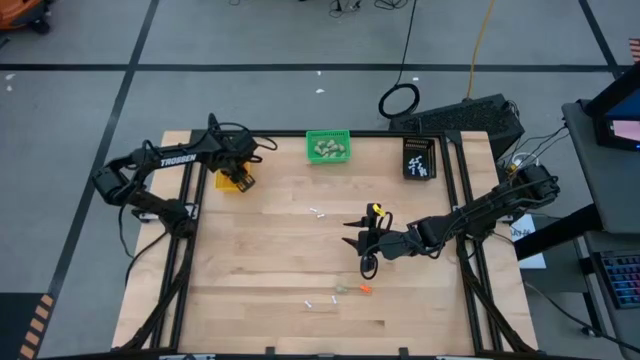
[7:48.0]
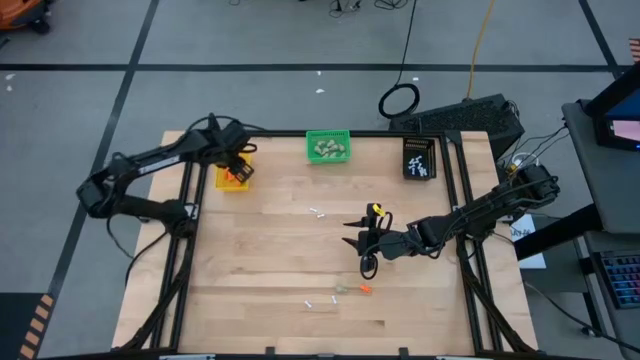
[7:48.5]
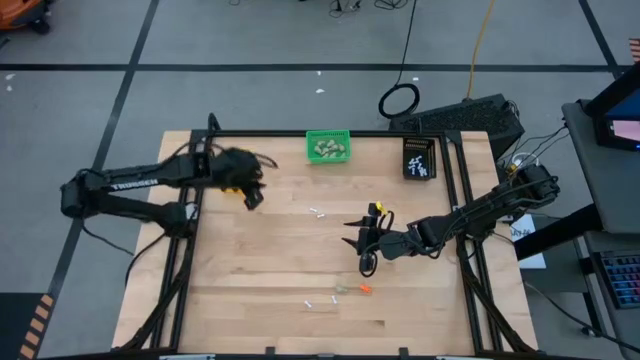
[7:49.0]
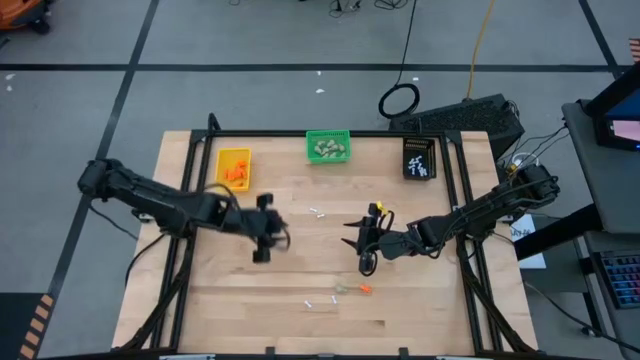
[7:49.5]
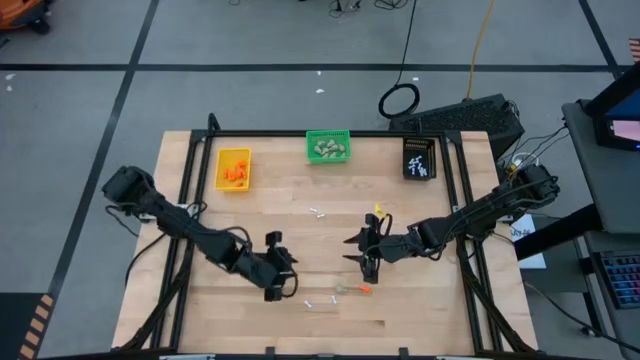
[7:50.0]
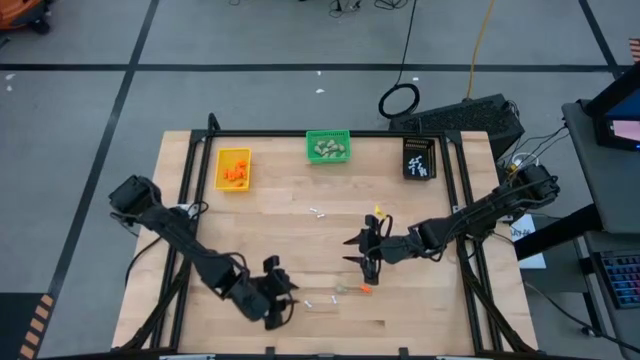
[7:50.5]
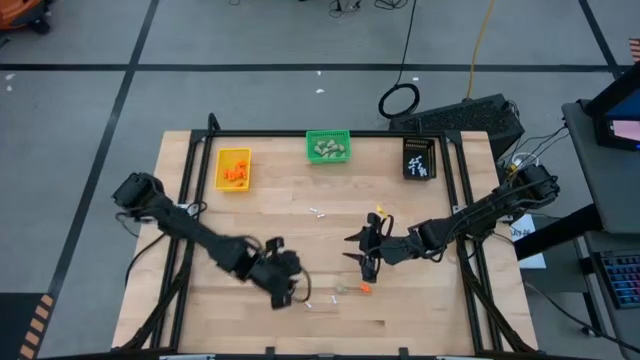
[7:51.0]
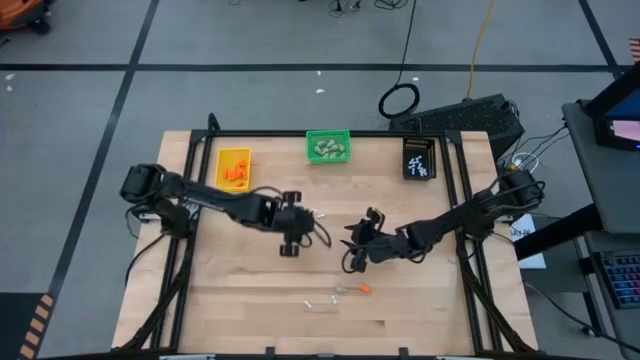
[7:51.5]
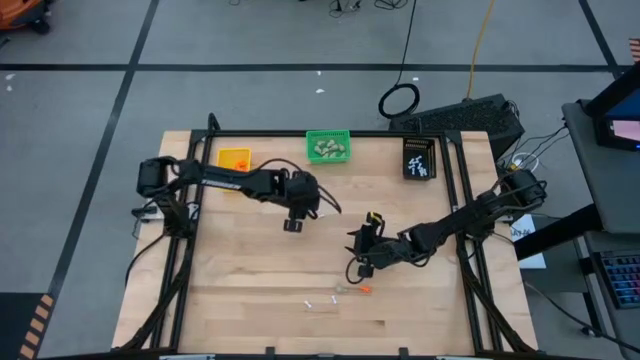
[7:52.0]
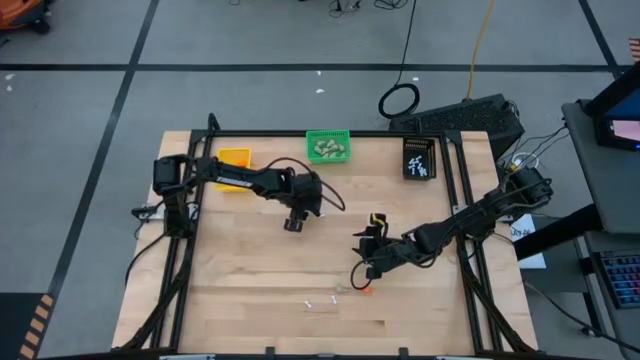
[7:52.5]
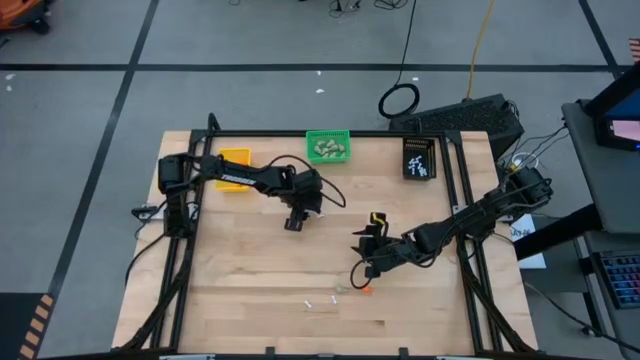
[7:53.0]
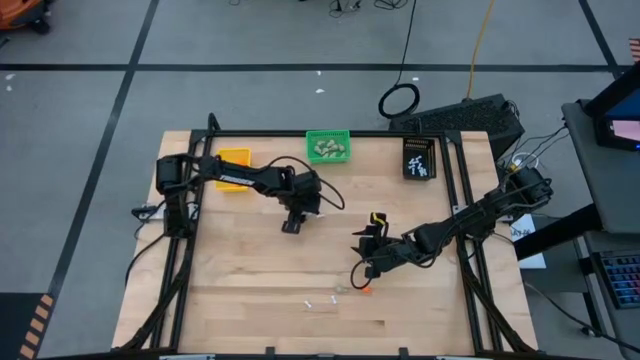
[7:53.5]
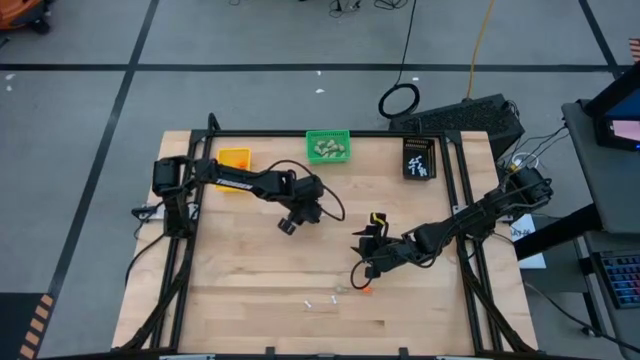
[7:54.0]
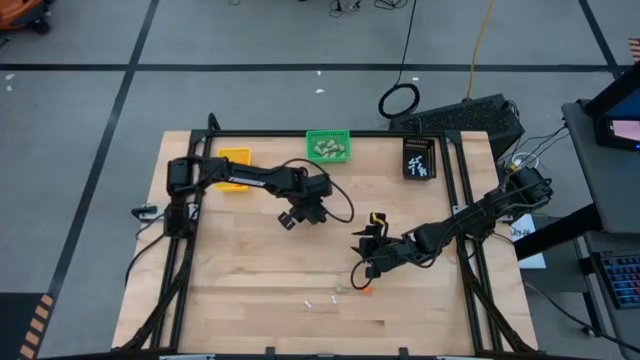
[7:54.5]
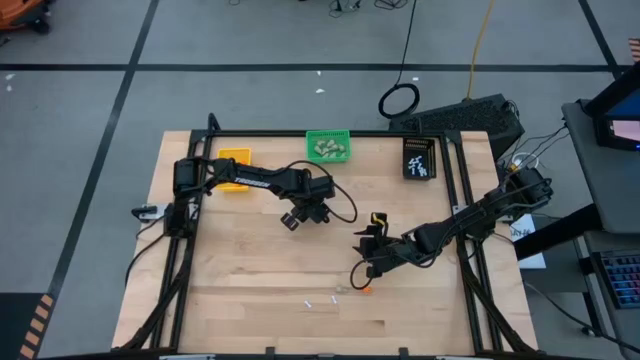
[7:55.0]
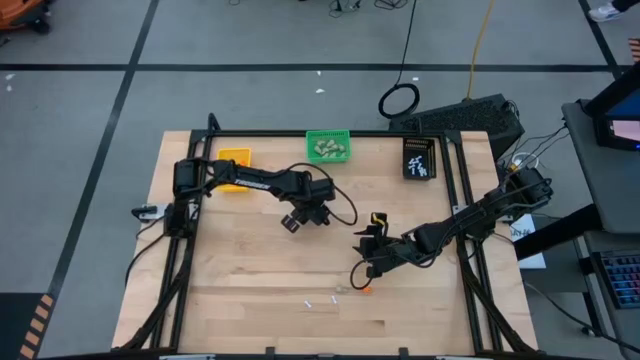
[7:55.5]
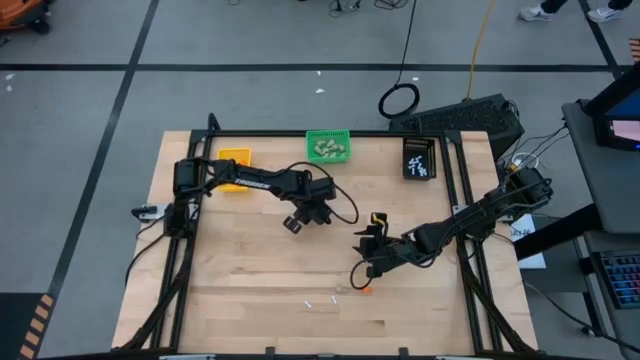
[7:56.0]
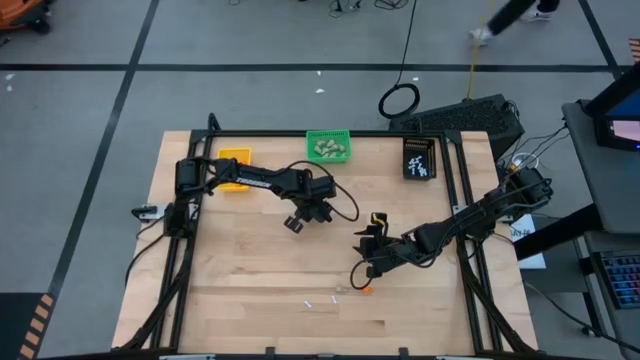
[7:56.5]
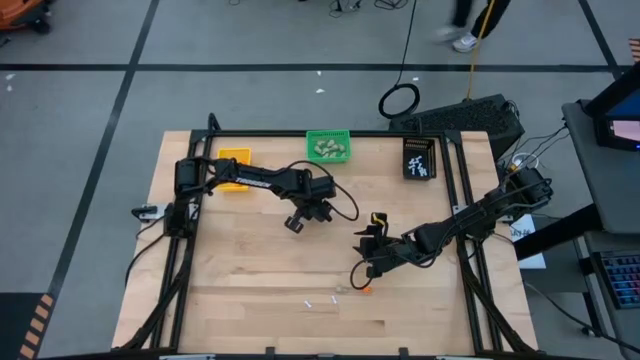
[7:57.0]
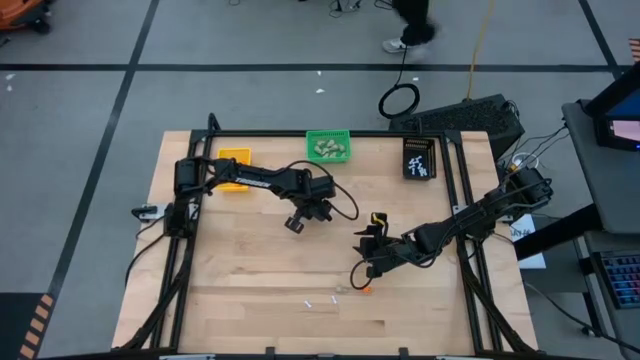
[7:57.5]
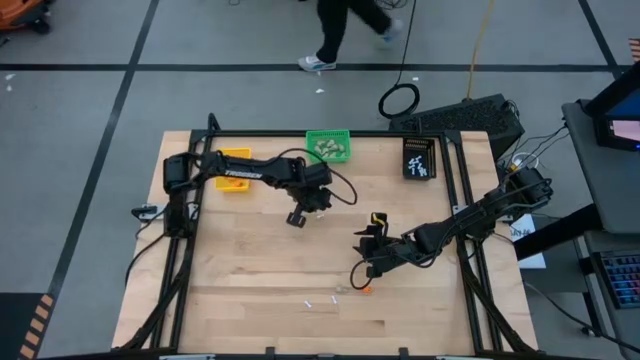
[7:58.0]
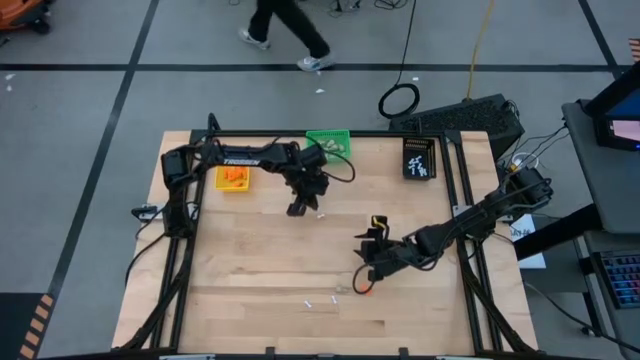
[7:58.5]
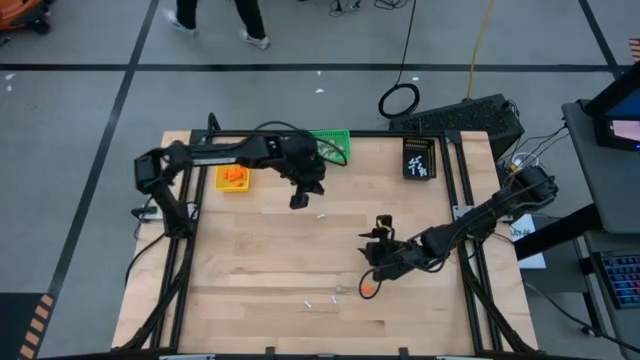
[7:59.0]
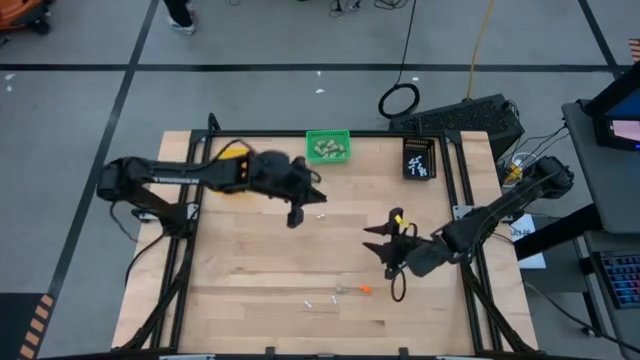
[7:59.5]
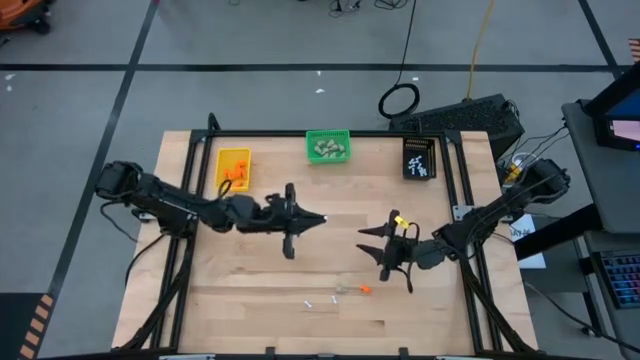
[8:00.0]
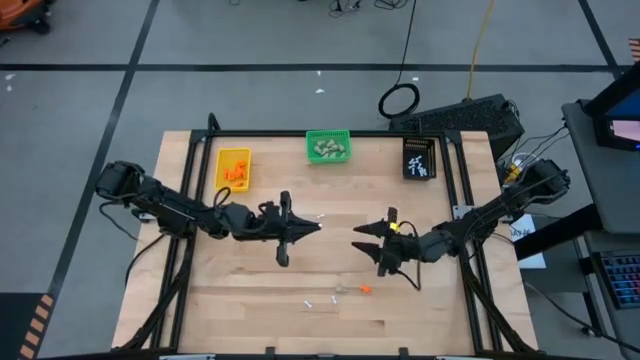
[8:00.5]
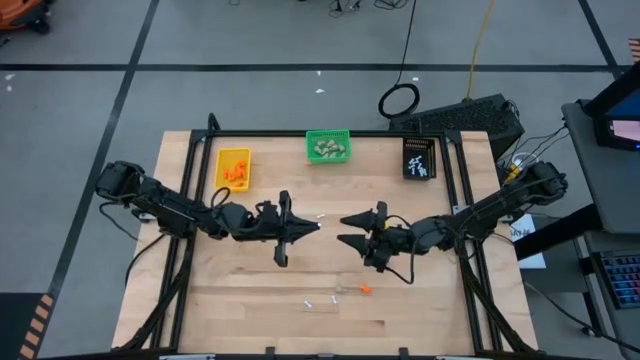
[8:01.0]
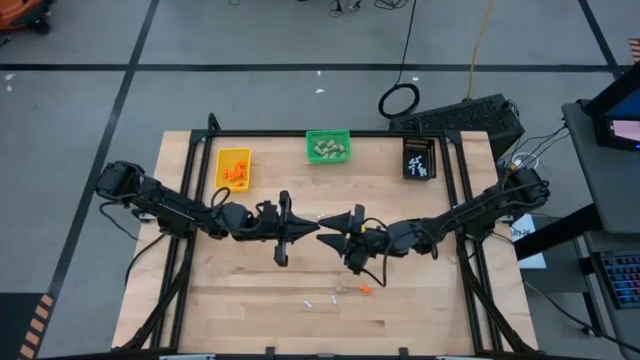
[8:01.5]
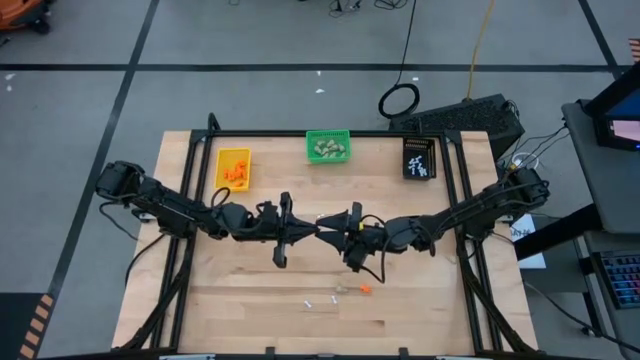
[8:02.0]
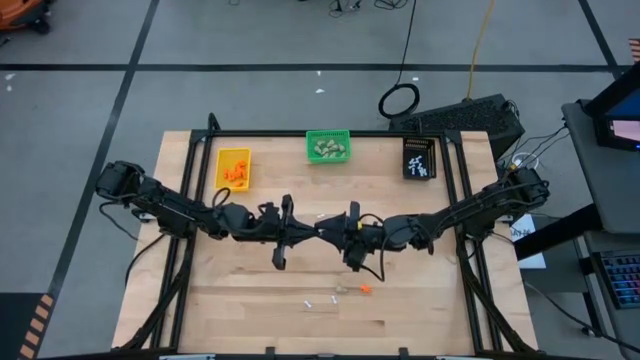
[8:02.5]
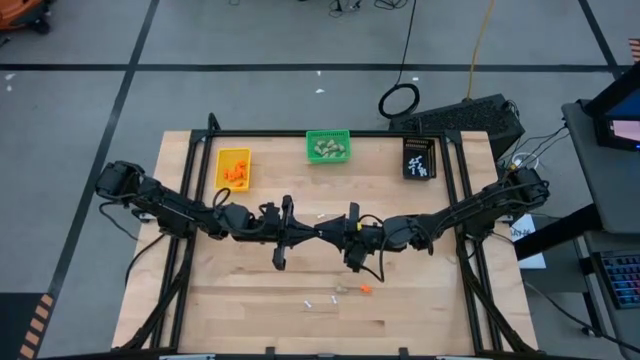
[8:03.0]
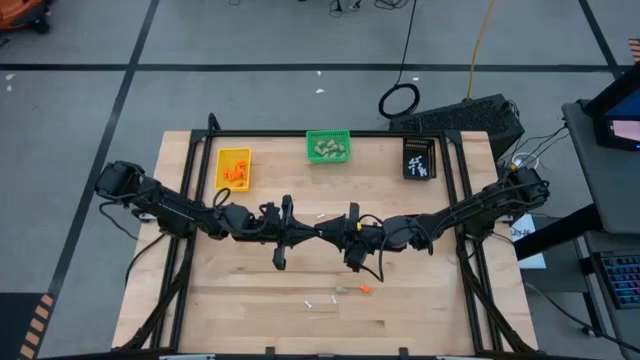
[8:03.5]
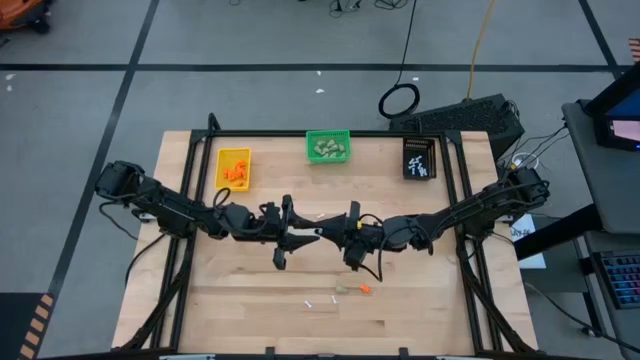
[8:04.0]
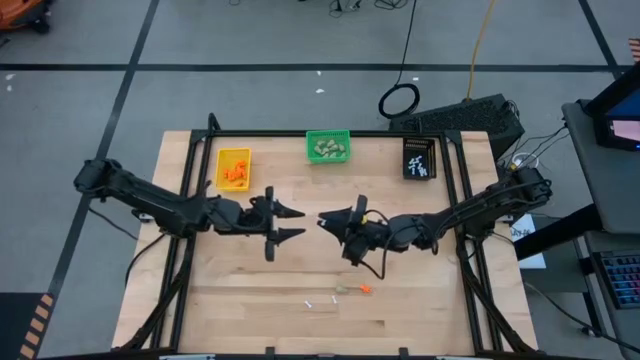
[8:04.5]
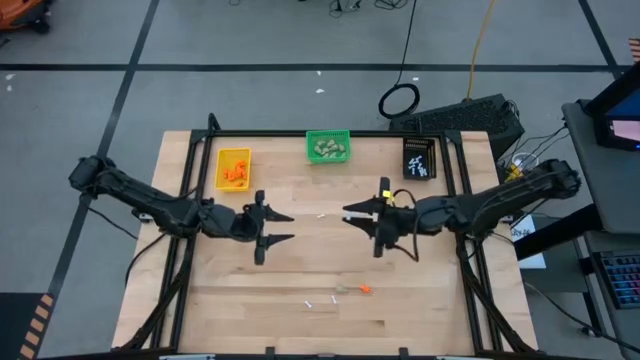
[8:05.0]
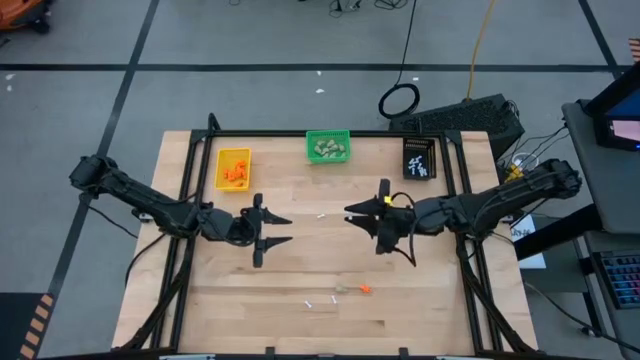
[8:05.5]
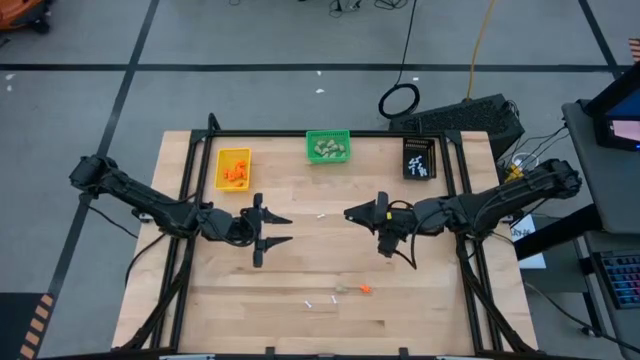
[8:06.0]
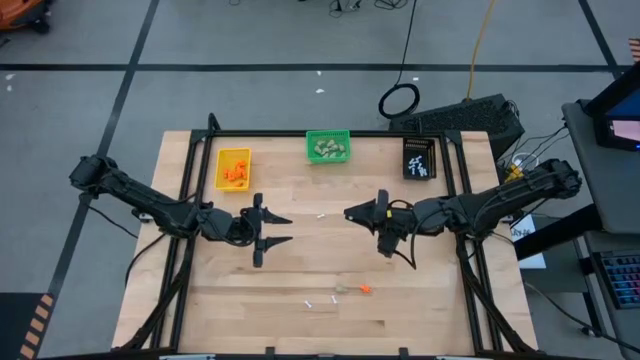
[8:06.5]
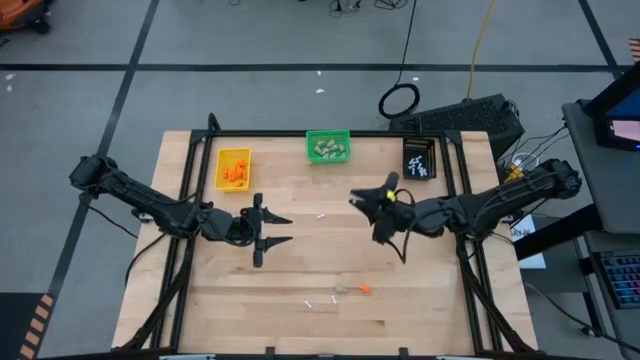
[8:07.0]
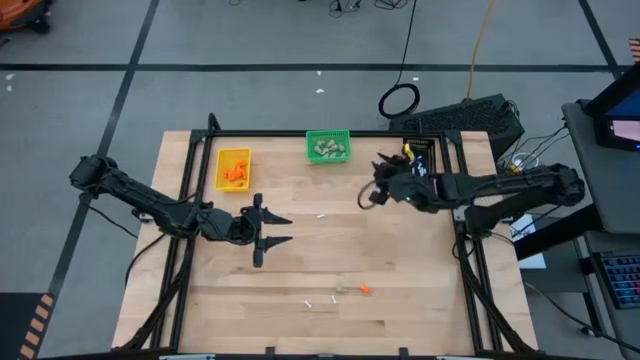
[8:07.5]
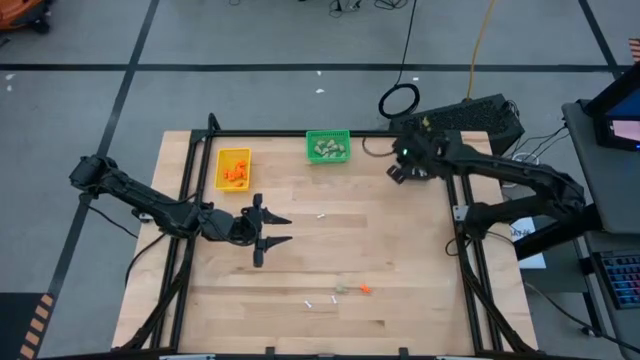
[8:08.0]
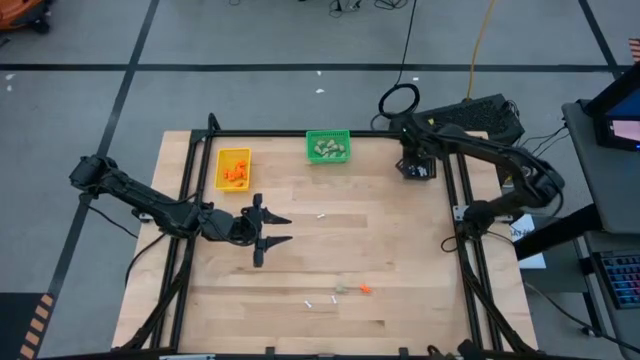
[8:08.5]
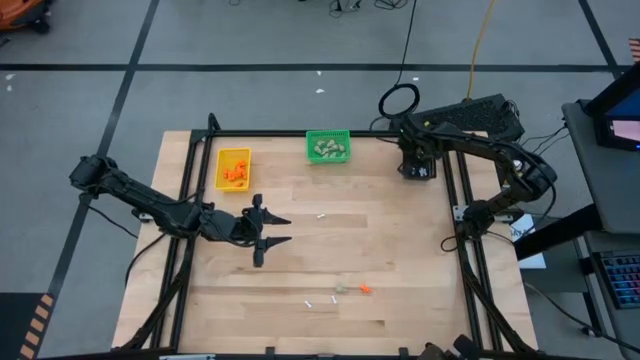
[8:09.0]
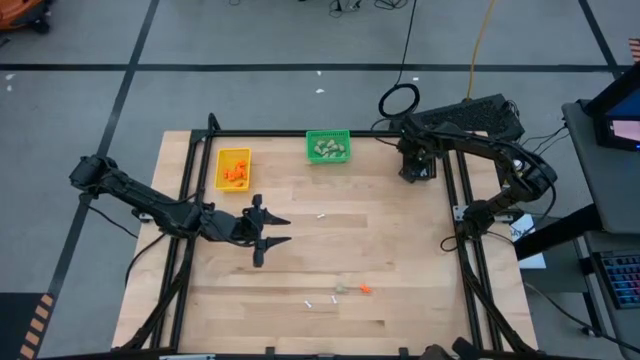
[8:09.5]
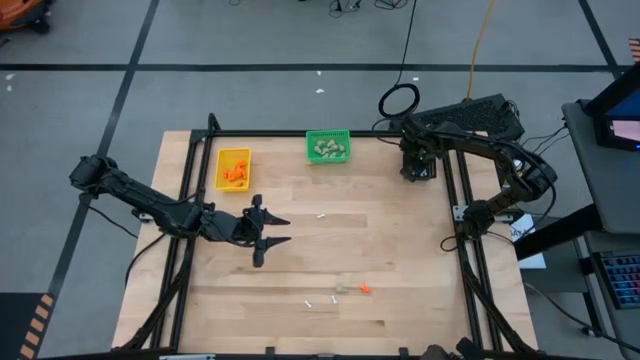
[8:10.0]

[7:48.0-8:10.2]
Task: Sort Halloween decoration
Put the white bone toy into the black bin
